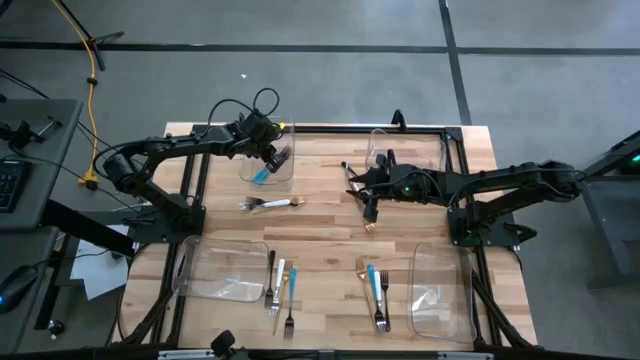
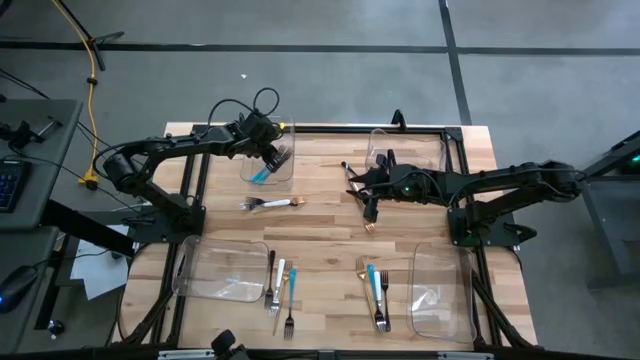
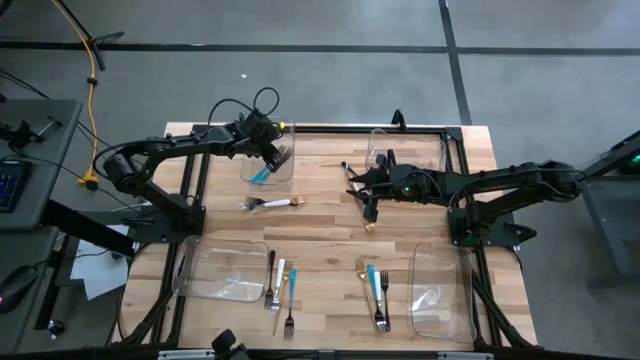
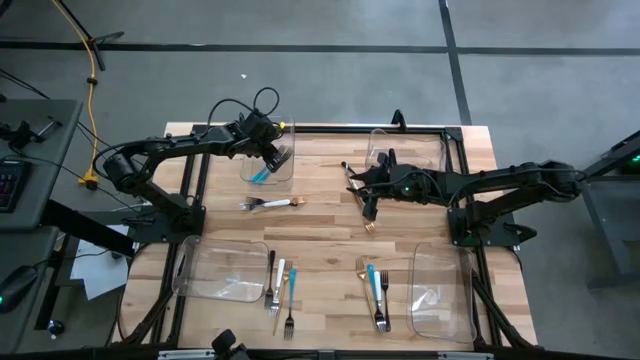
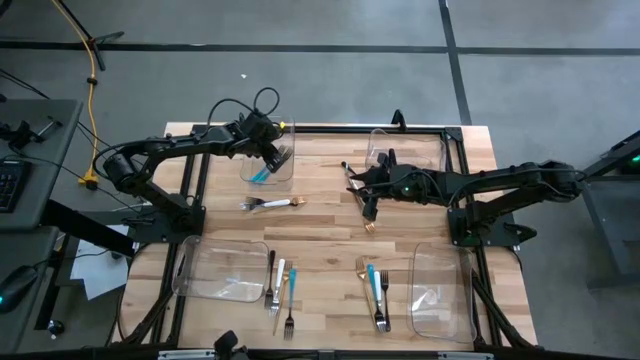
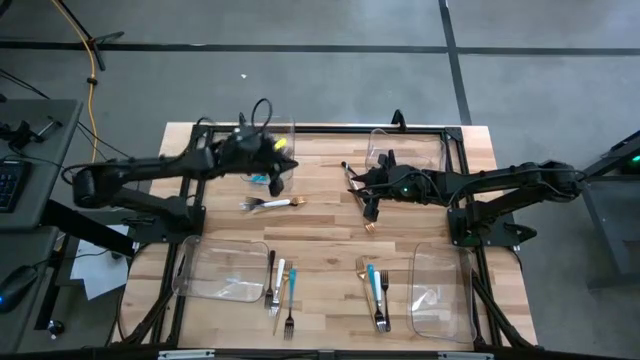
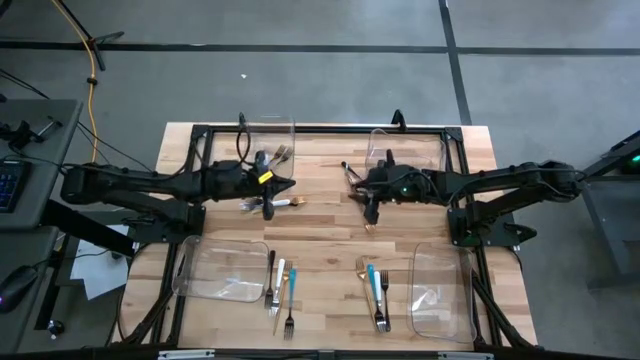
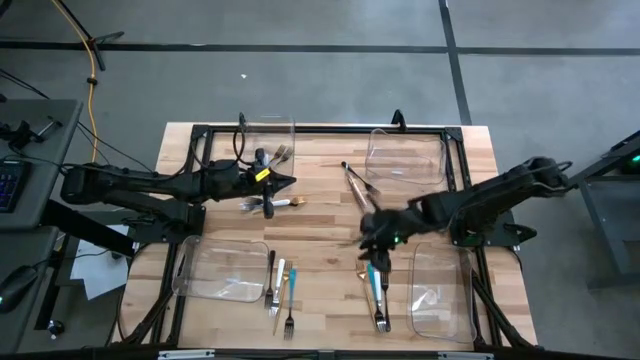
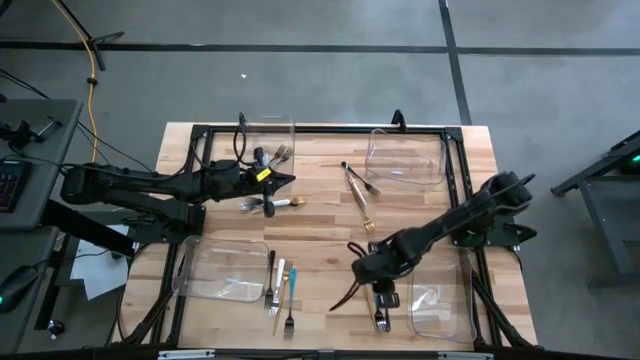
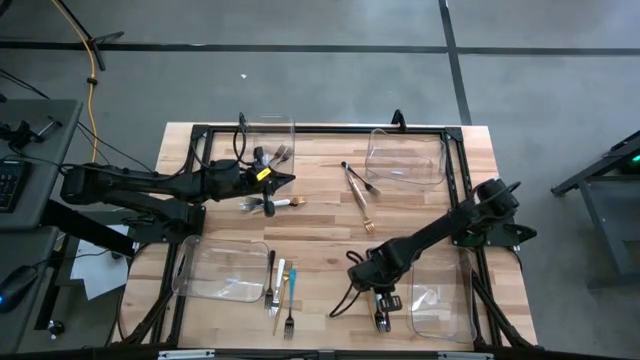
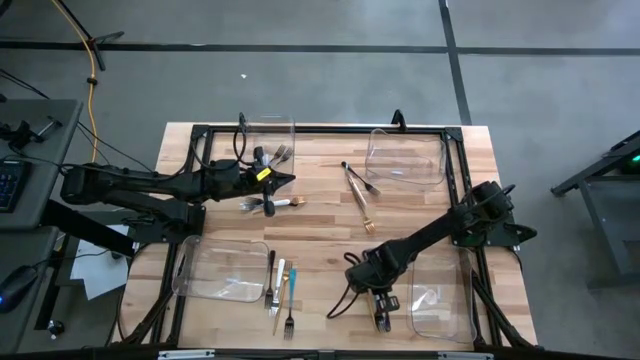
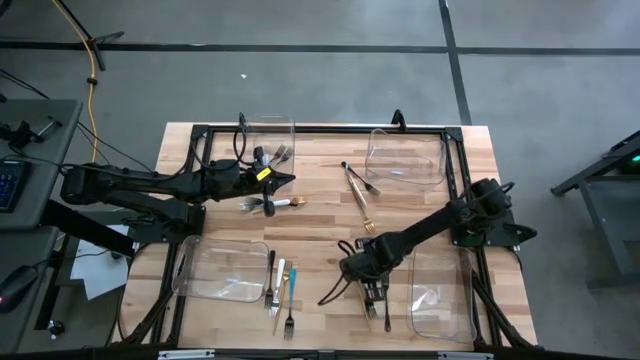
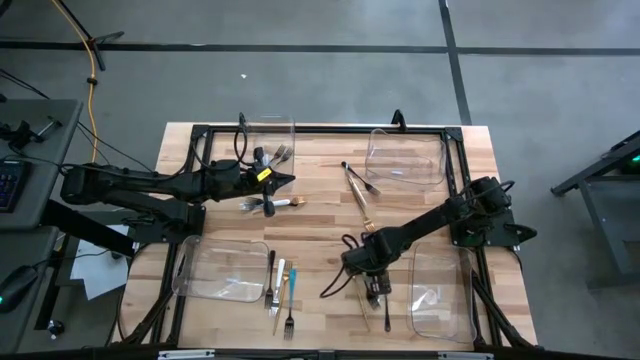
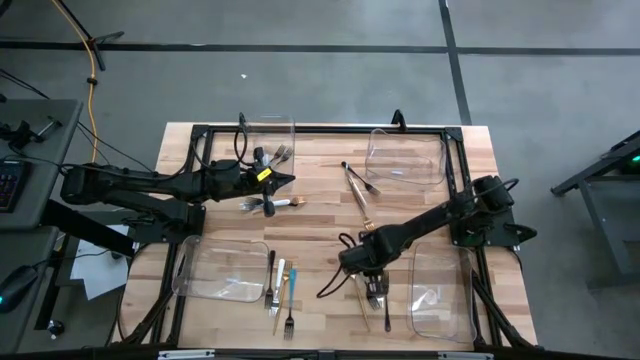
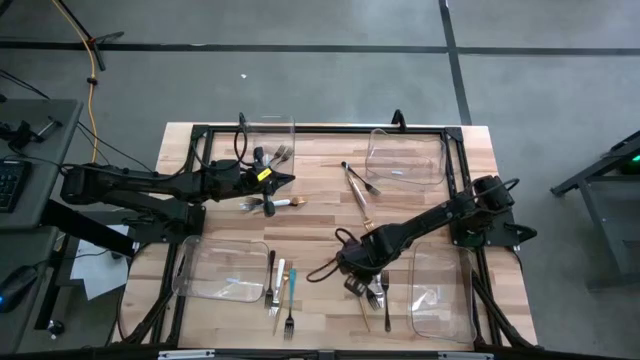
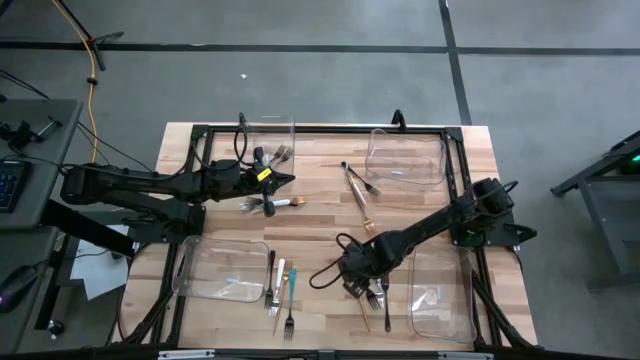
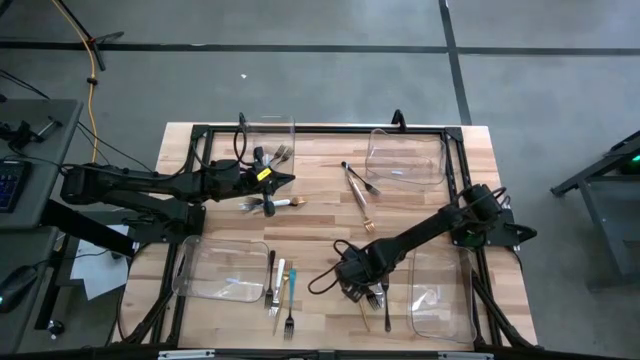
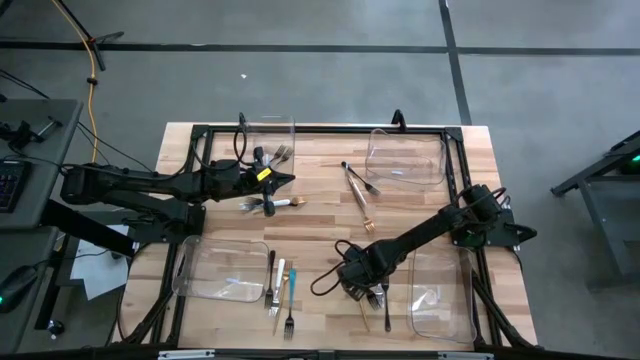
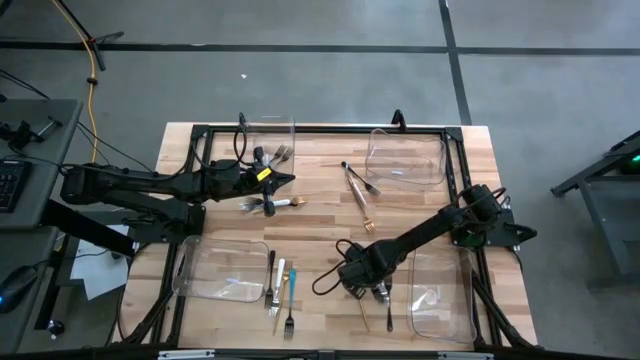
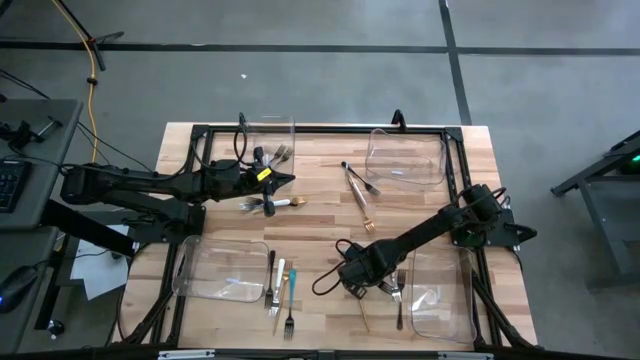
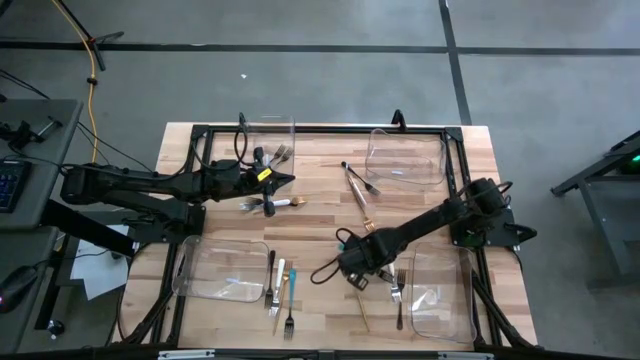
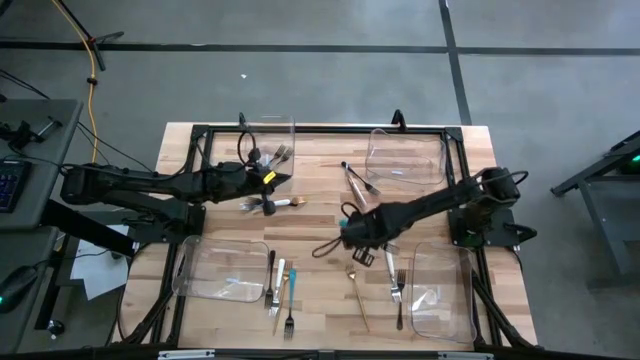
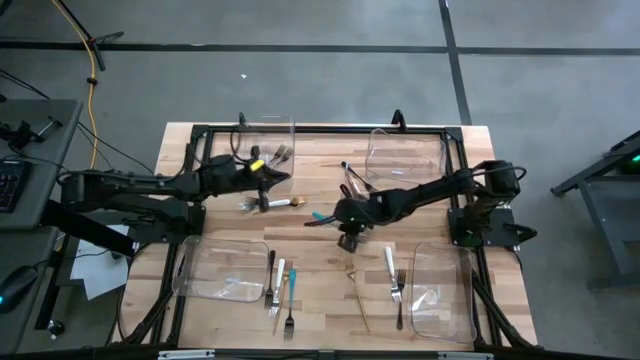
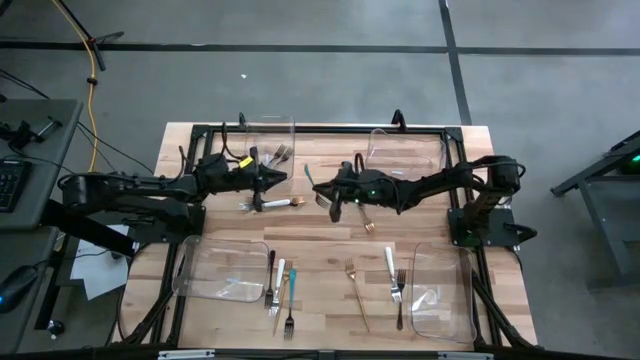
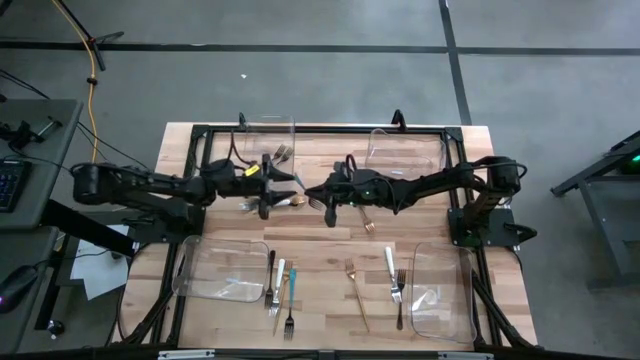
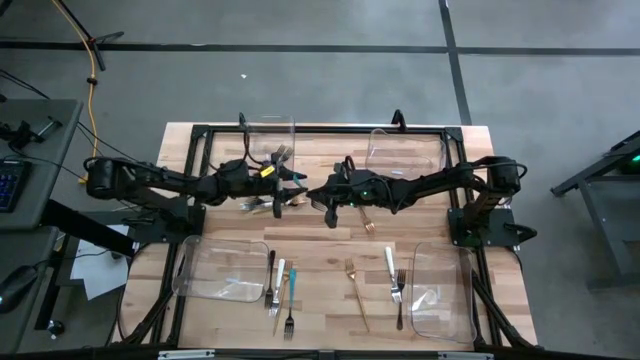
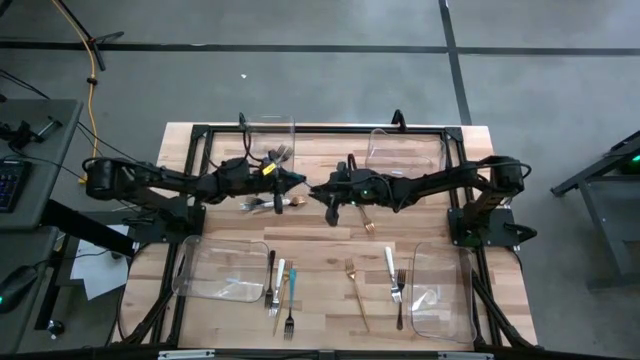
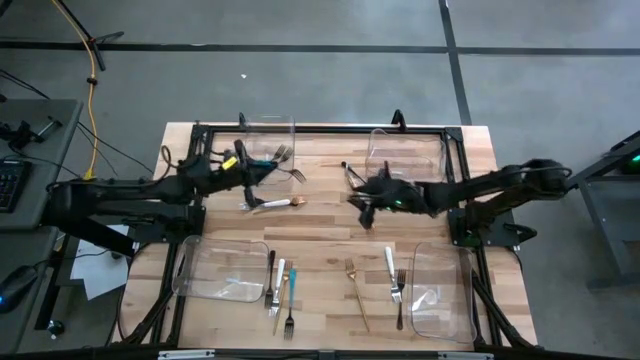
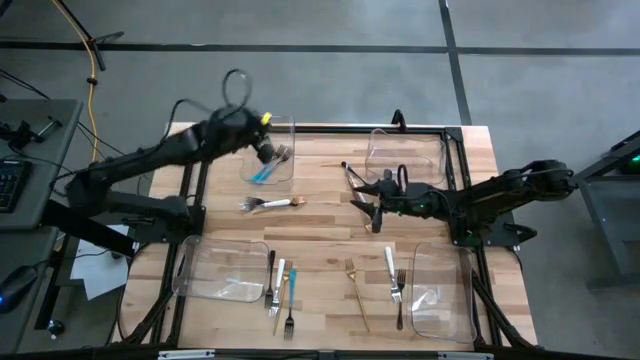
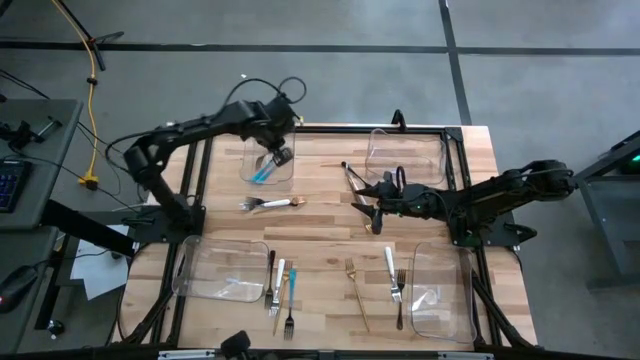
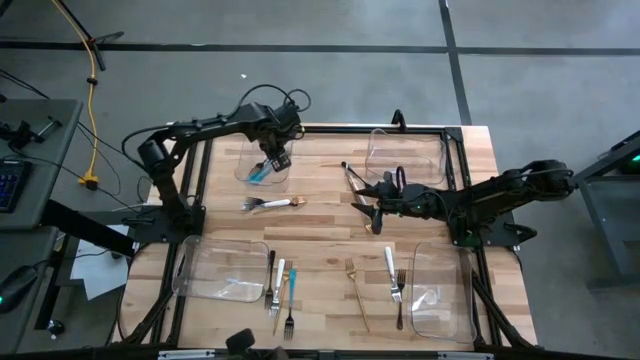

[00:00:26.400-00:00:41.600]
Task: Sort silverware by color (type)
Put the blue fork into the top left transparent bin
